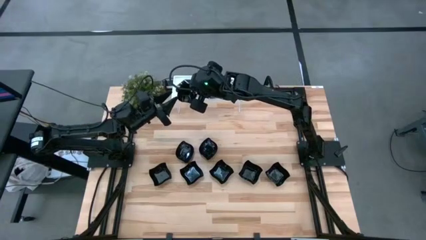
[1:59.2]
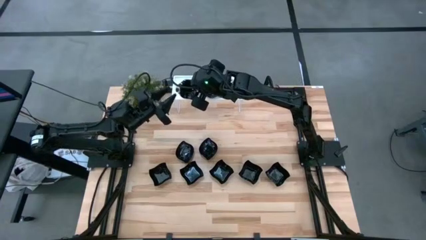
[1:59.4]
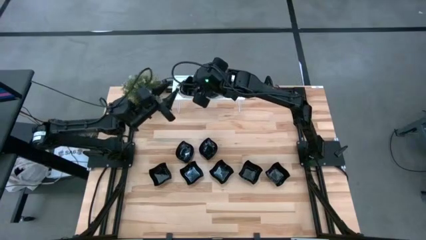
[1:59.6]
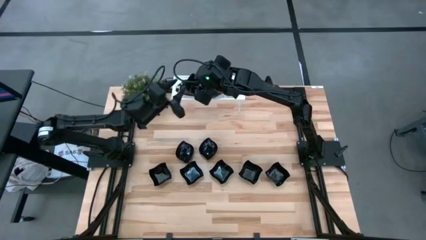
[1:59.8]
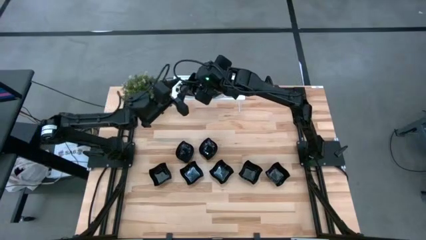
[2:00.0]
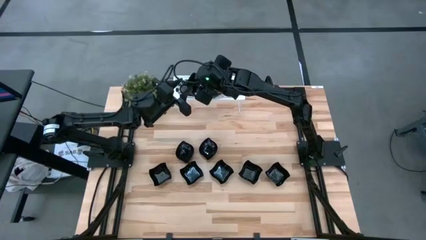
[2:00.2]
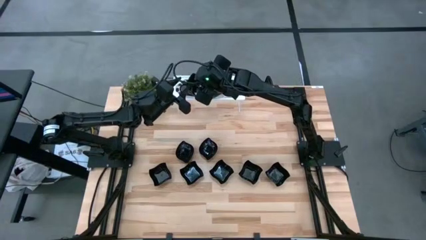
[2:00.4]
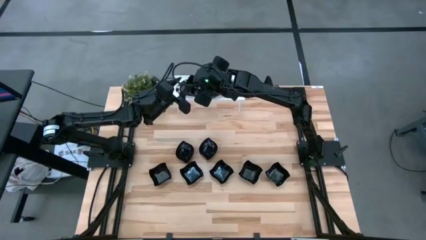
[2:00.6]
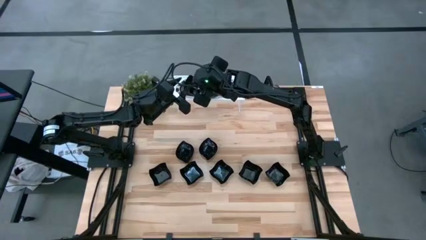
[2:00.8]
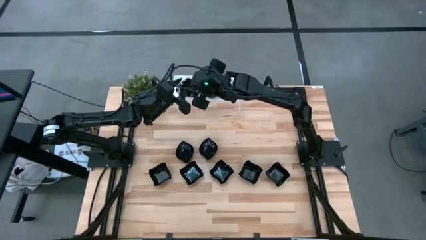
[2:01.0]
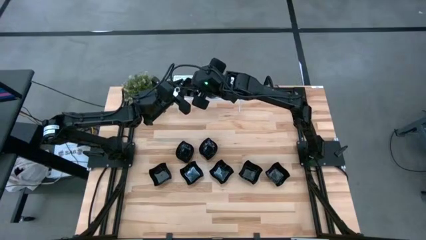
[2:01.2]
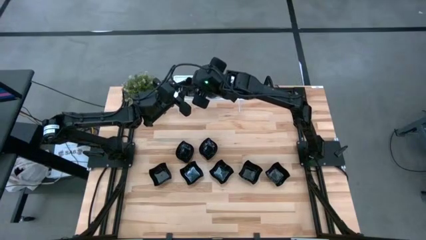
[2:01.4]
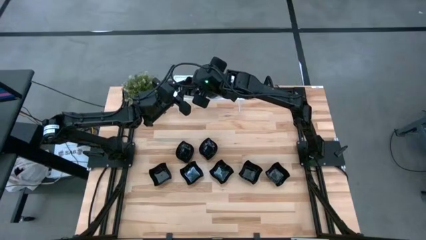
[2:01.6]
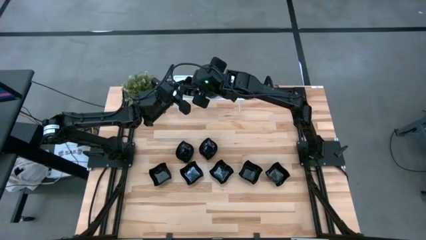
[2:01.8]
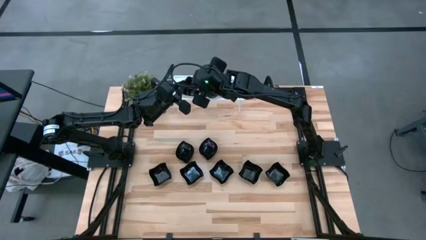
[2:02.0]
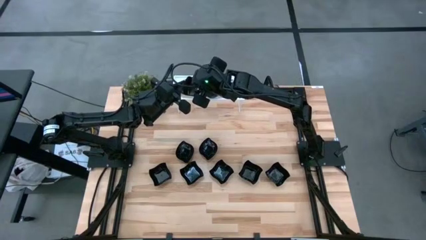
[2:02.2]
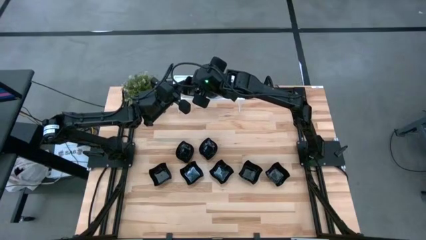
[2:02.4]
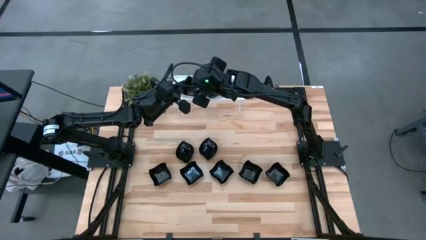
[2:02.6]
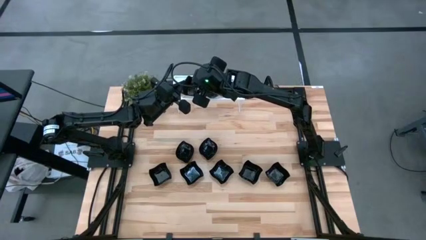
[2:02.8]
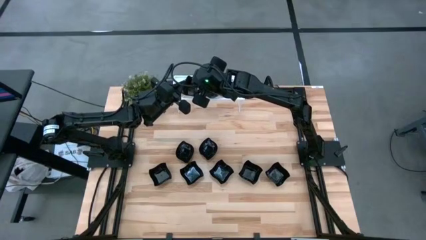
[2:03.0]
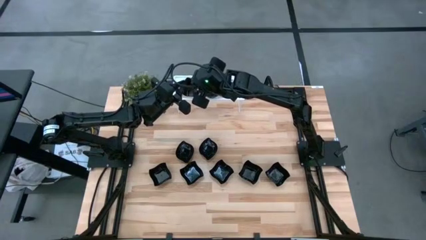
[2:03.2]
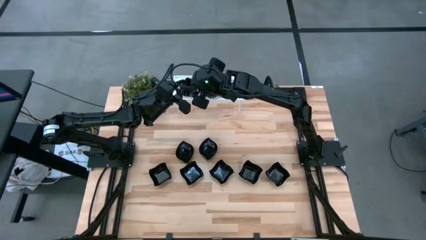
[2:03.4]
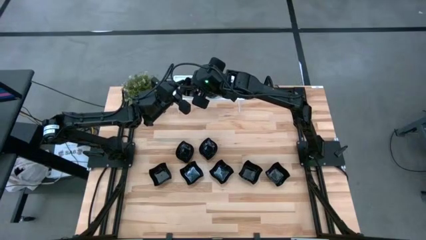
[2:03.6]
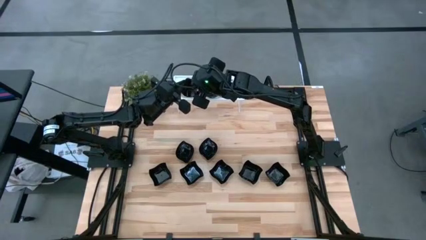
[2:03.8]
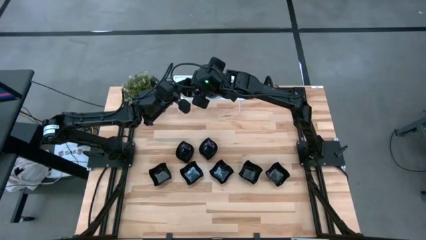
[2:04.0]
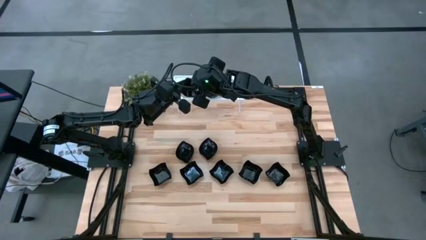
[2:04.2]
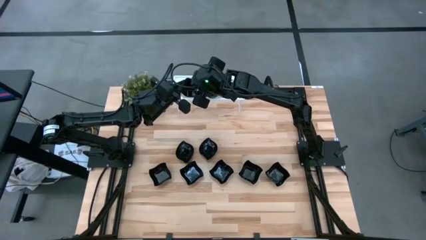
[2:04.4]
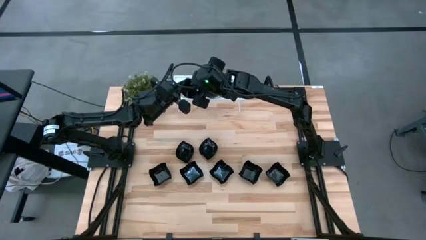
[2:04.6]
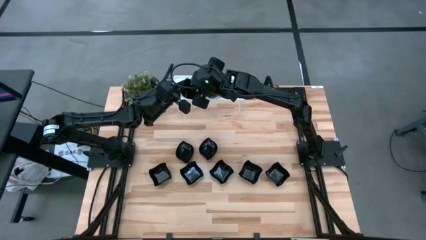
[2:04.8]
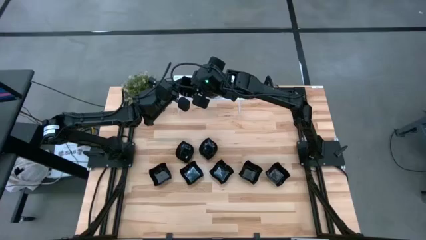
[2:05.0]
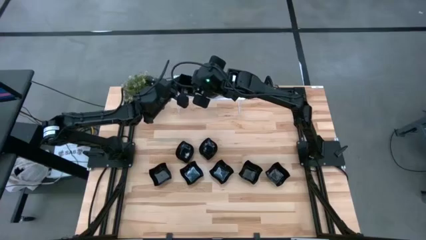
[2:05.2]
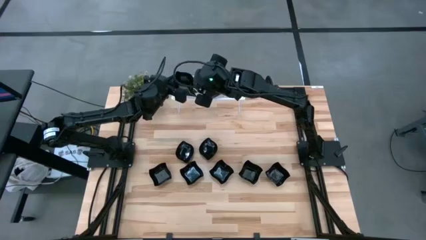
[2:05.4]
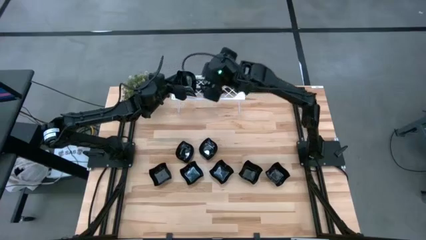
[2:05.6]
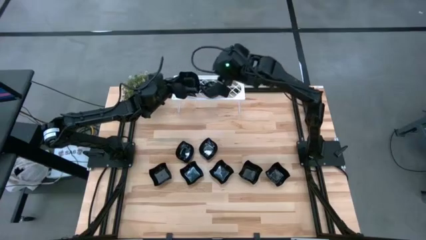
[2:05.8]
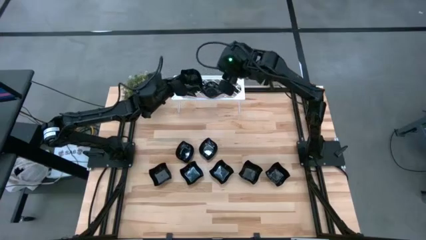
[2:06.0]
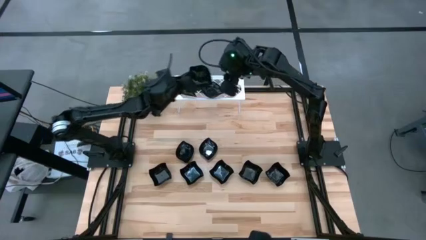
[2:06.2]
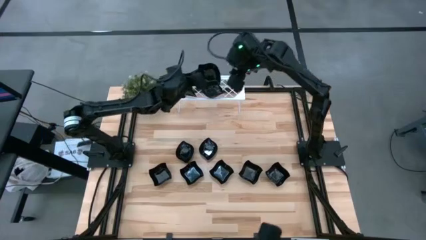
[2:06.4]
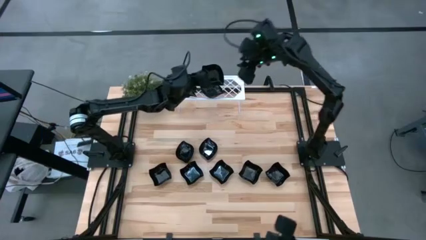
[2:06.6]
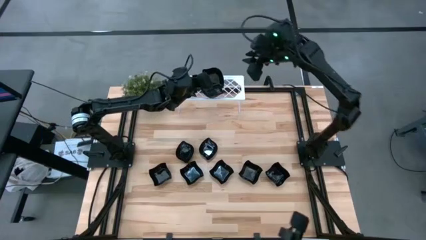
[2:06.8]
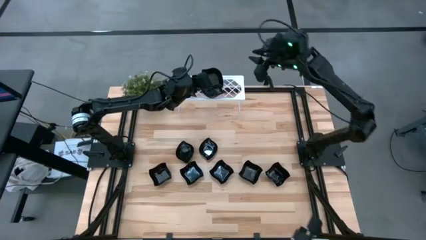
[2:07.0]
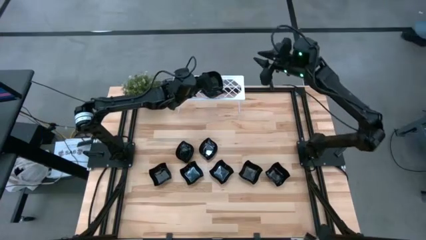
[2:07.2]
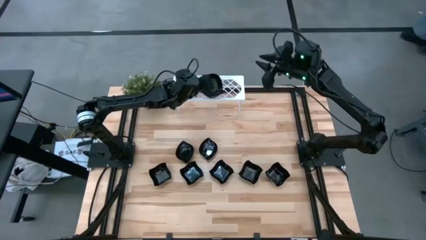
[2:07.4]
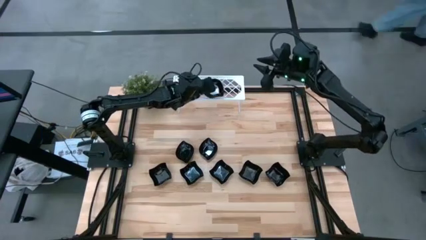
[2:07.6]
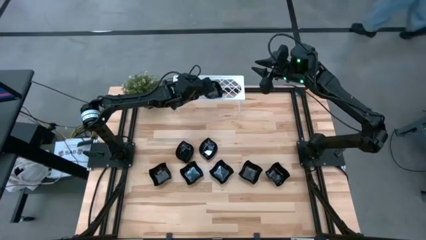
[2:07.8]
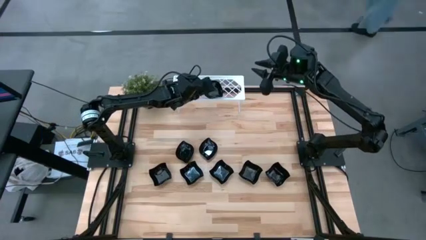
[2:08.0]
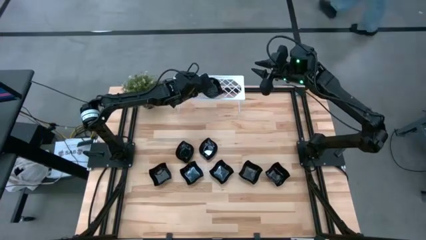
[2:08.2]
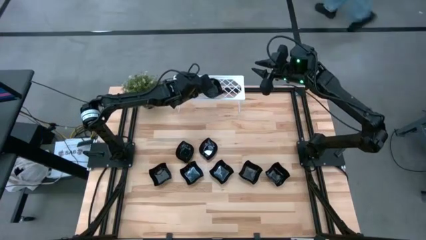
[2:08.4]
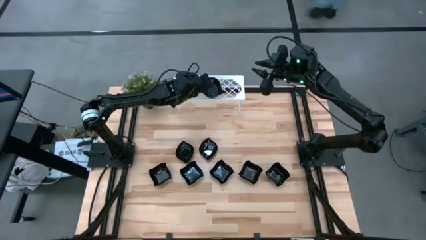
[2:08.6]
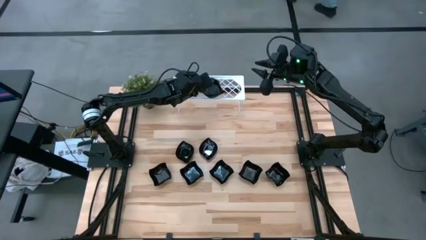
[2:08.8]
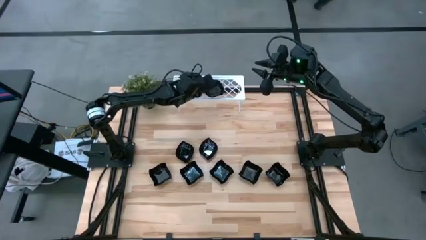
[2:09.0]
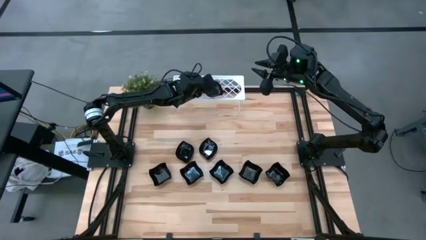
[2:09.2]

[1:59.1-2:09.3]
Task: Pick & Place Mini shaped plates
Stack the black leaf shaped plate on top of the black leaf shaped plate on the shelf
